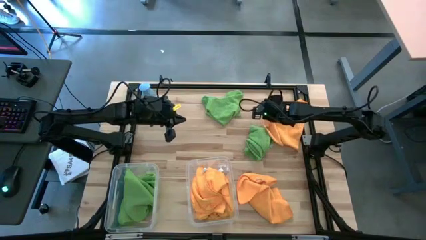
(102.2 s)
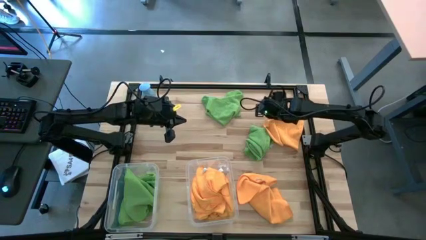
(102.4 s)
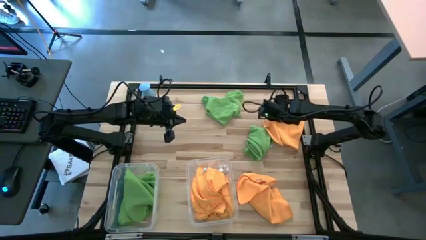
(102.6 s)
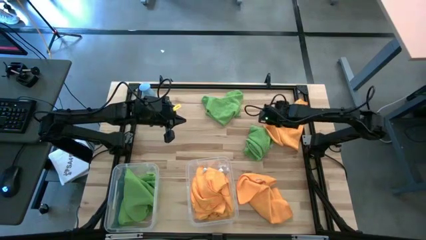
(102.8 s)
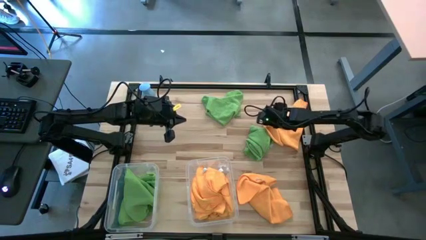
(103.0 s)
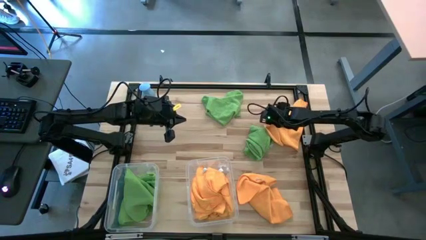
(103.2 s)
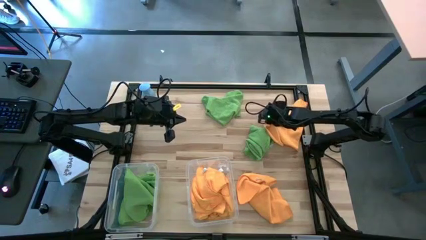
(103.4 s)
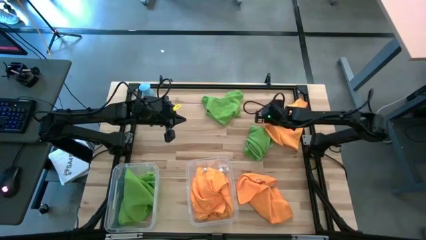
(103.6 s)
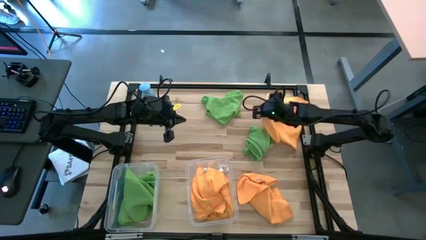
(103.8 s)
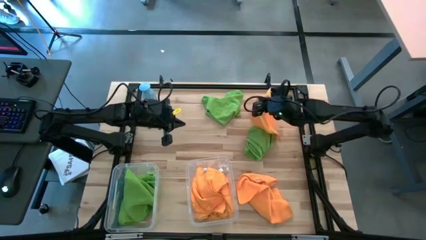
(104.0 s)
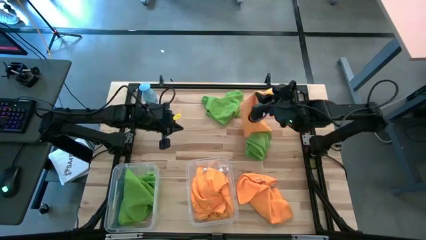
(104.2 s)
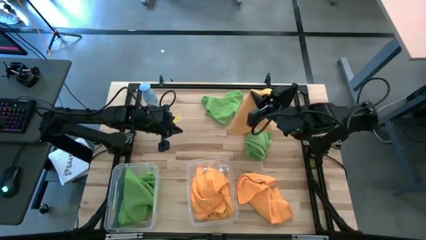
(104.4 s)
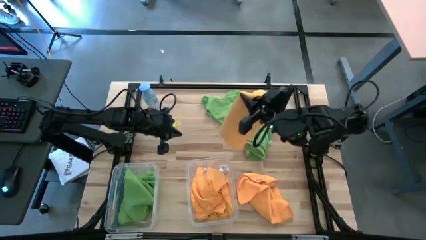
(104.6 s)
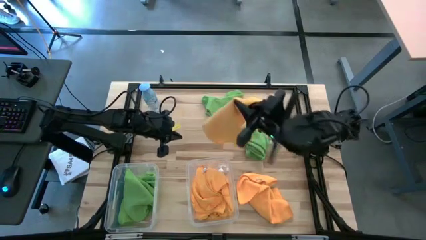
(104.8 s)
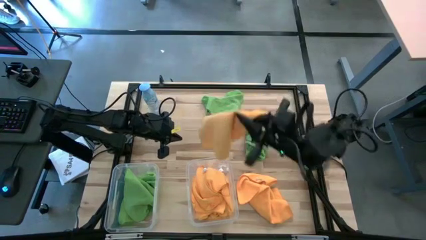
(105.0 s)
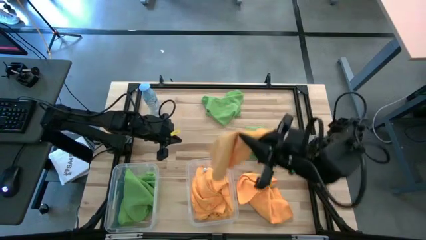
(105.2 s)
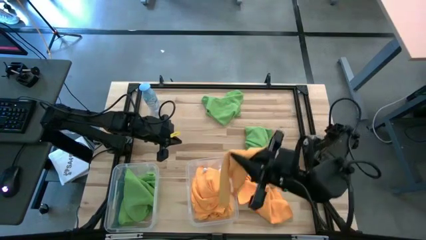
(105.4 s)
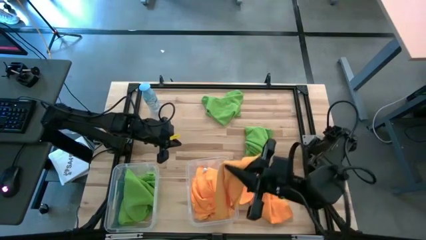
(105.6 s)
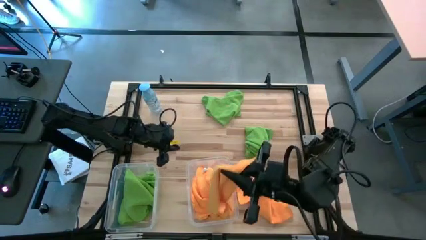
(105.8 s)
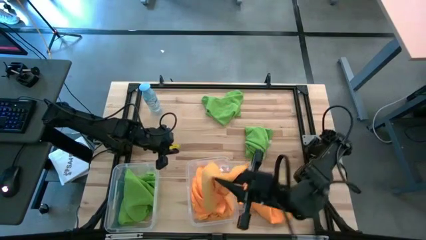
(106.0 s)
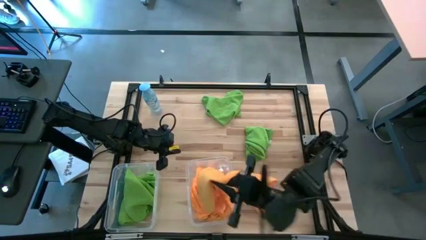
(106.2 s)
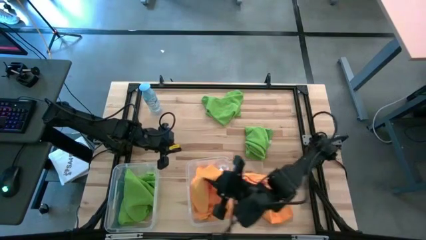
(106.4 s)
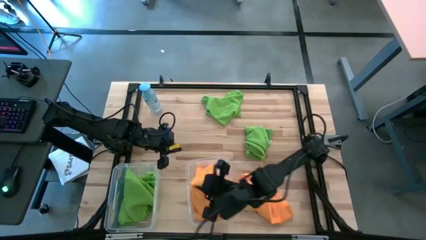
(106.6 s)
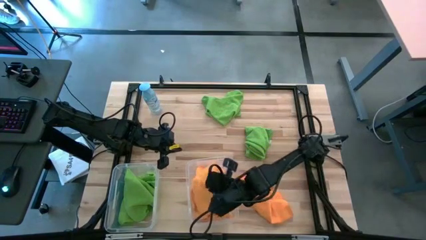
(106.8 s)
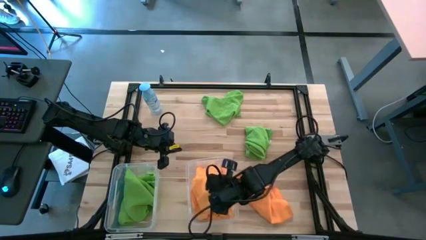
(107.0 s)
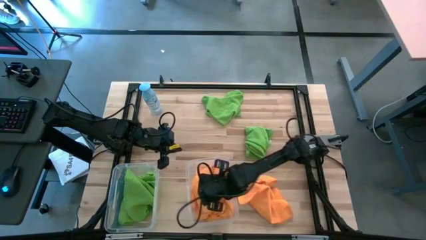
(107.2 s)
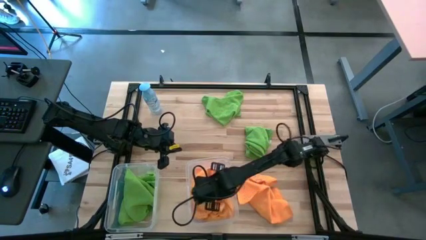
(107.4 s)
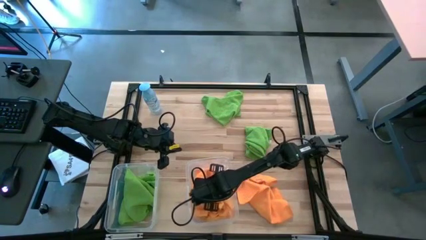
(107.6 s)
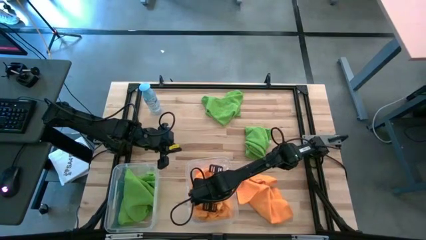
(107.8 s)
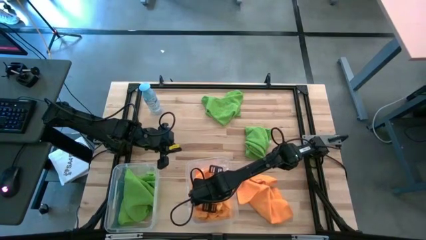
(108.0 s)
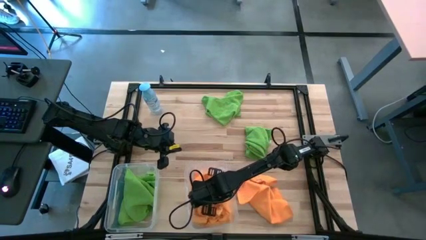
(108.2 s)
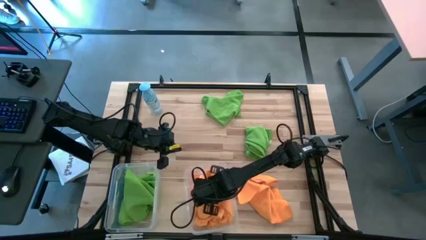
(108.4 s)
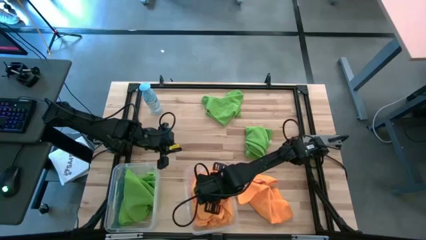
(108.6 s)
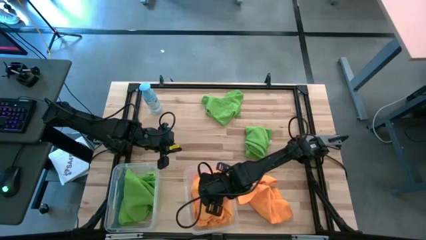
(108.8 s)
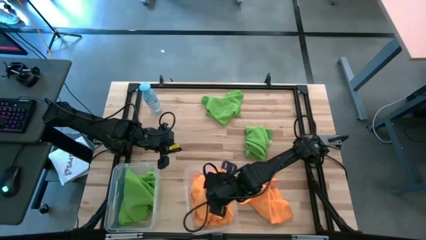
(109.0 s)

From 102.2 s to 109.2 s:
Task: Sort microfiber towel by color & place in baskets
Put the orange towel into the right transparent bin

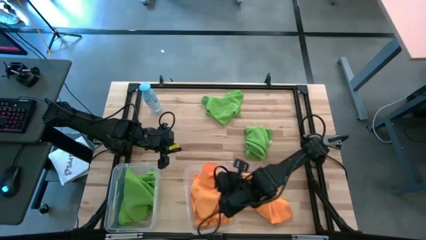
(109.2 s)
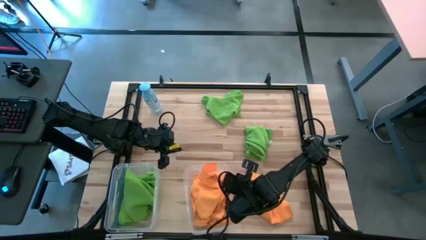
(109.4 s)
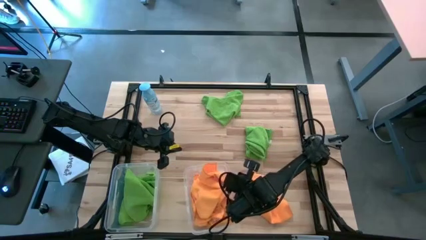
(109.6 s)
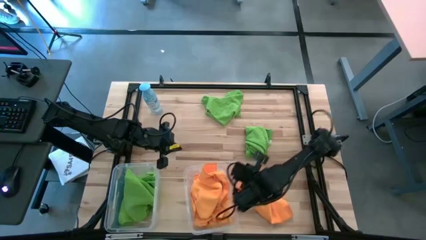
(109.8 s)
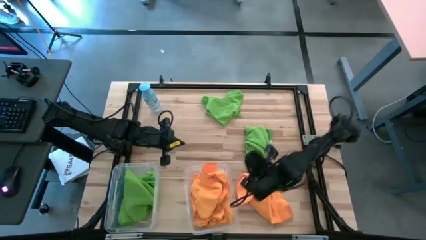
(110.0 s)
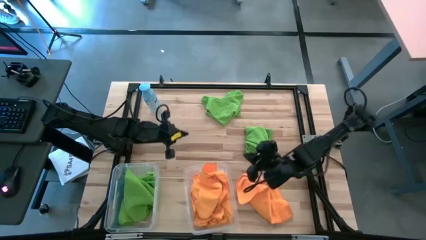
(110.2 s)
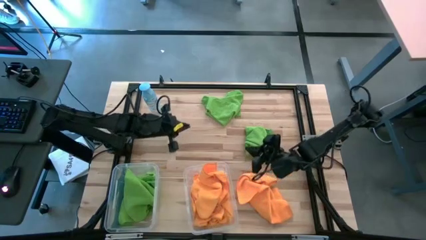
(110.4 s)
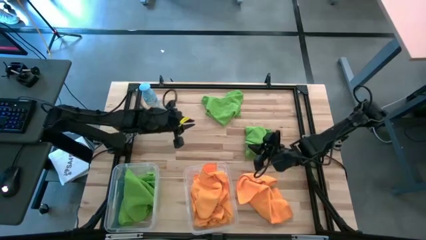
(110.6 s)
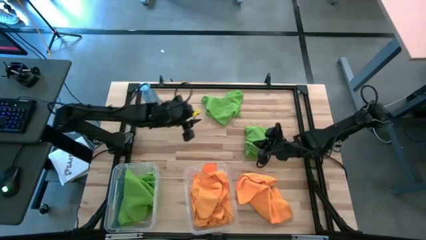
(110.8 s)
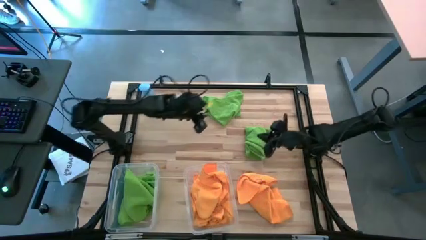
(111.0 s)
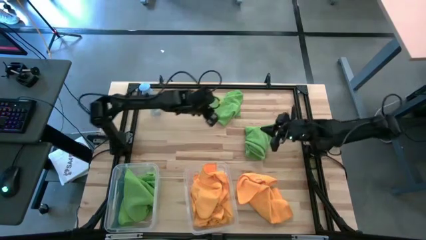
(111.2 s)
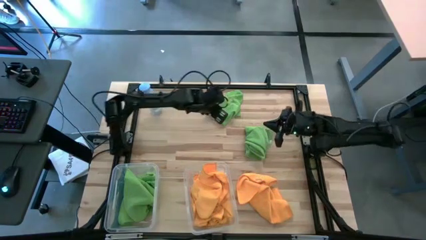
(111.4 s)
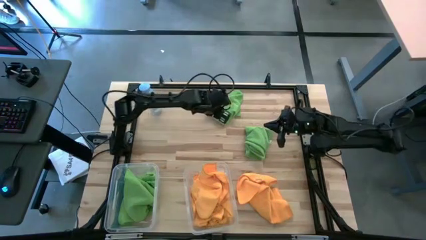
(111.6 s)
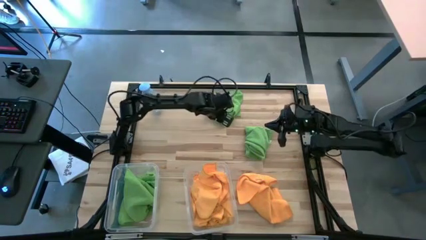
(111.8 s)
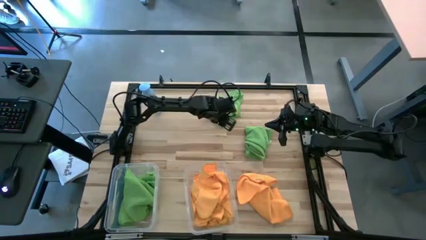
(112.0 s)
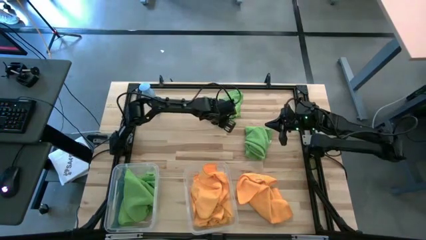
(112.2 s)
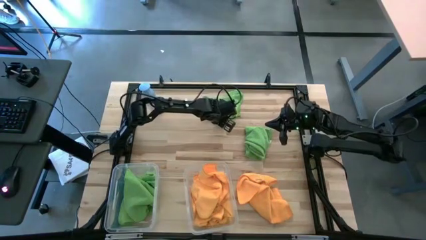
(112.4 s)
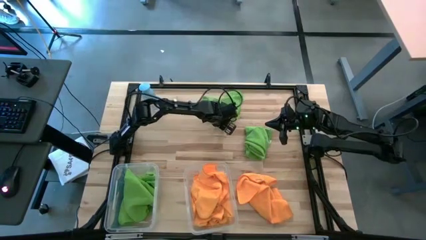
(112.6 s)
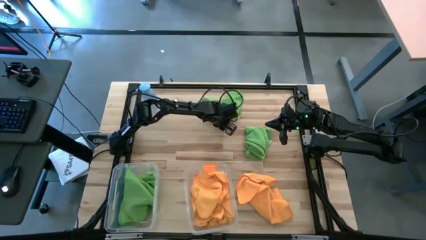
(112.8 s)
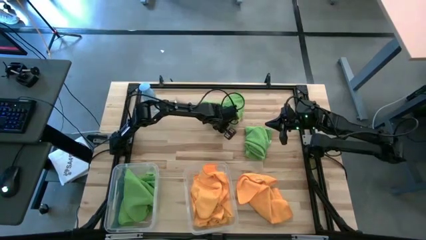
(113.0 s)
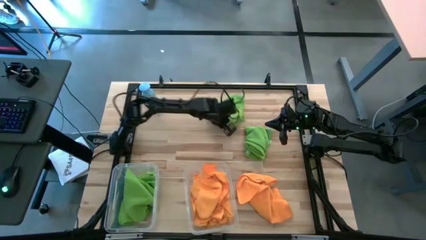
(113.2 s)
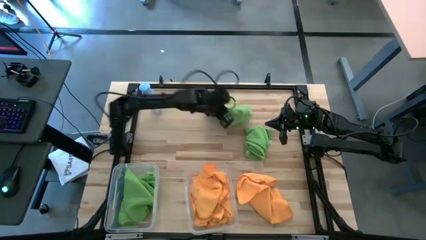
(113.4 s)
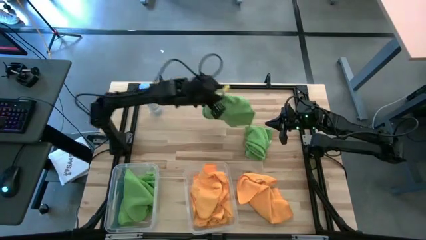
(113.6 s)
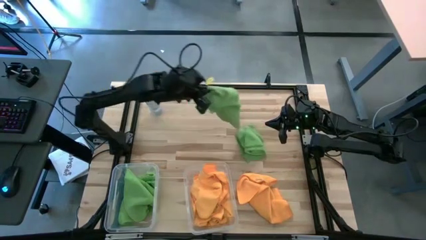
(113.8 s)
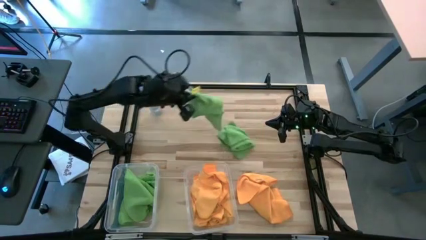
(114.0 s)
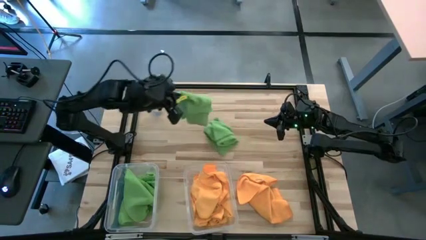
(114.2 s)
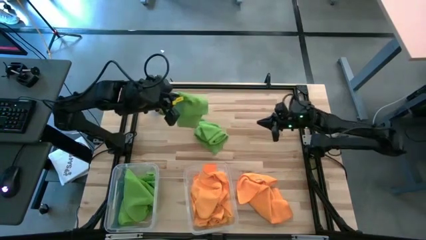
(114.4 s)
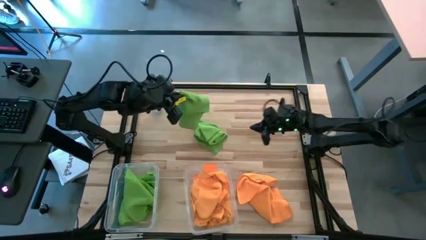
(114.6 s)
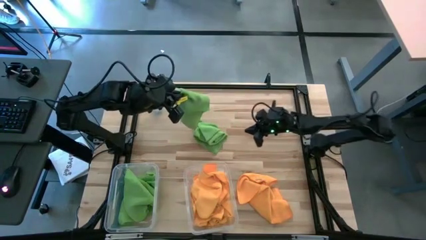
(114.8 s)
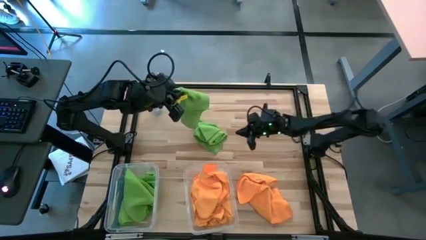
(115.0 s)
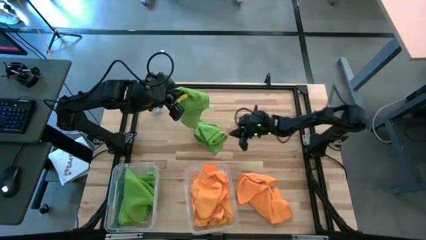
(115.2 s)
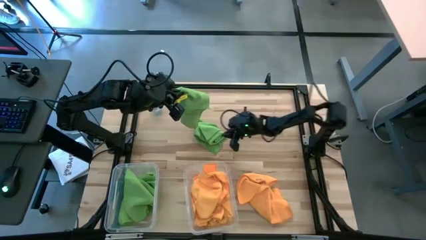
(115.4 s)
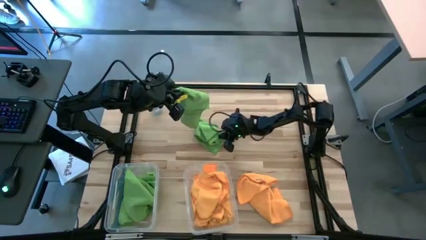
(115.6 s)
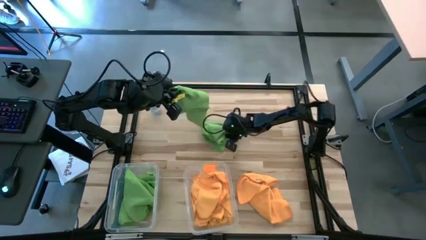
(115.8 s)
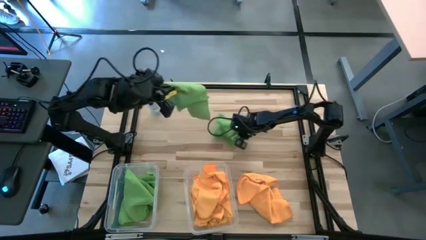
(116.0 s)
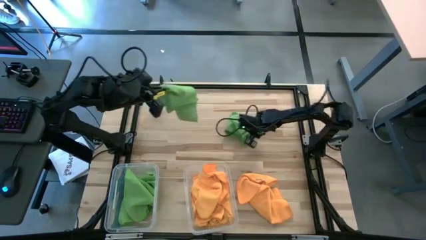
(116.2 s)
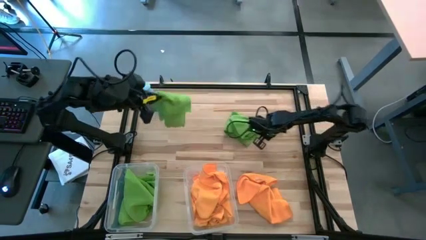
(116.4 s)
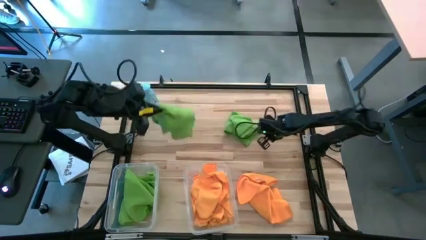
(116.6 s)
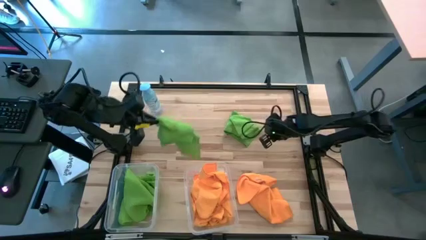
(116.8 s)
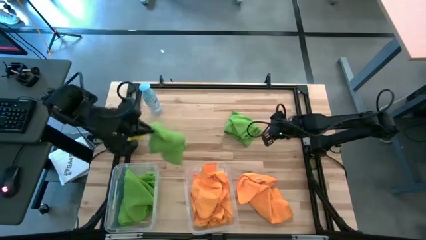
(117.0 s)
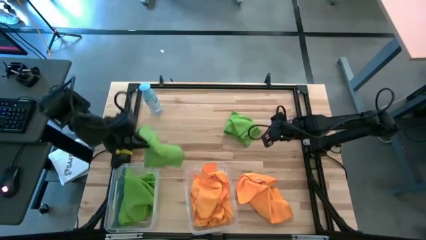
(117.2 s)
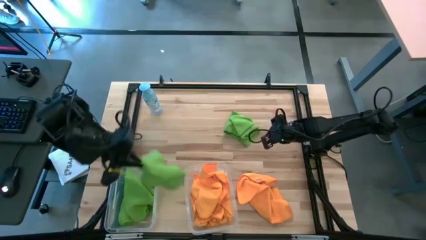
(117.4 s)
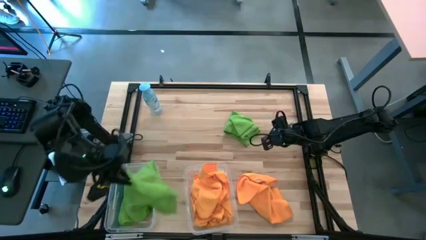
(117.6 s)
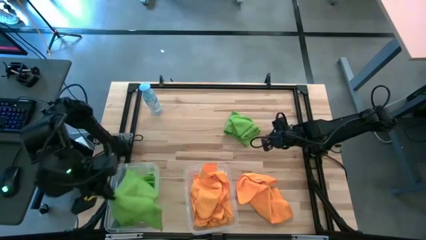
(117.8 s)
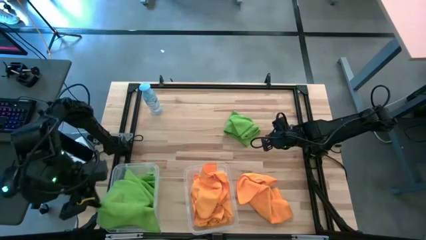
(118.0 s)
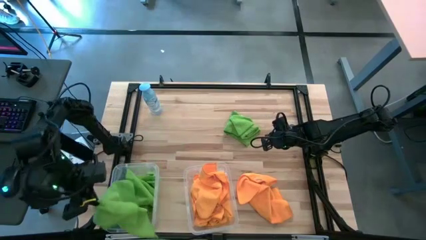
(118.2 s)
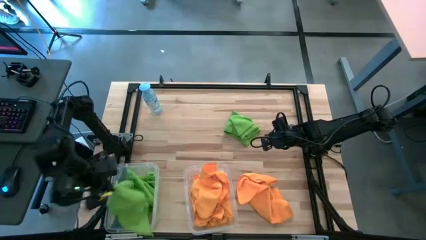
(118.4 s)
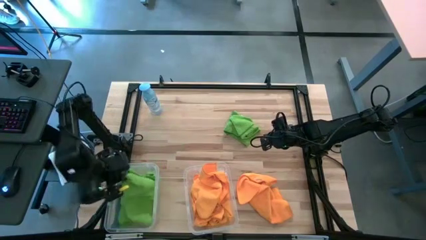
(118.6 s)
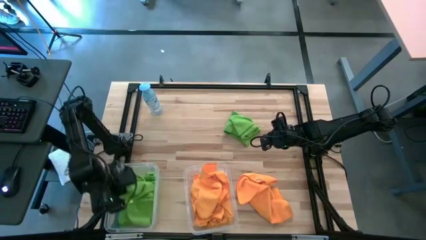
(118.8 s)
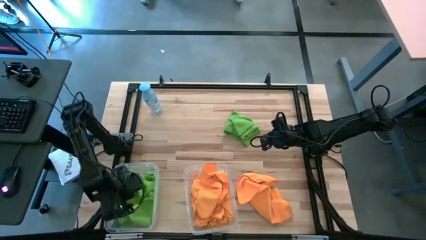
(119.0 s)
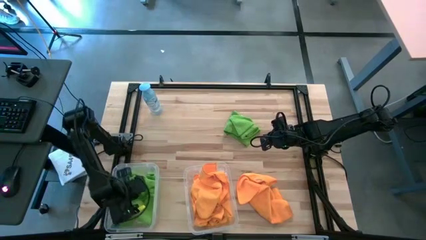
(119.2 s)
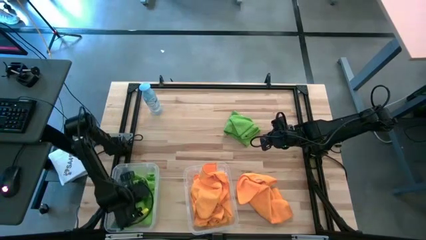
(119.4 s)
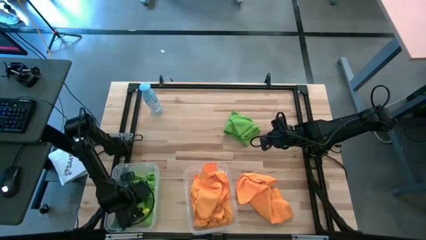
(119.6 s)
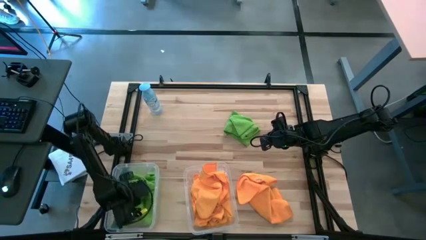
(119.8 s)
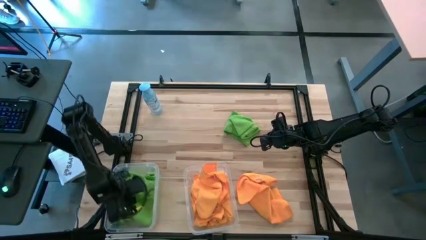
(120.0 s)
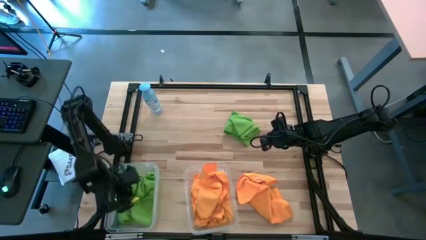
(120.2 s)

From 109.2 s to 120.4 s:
Put the green towel into the left transparent bin
